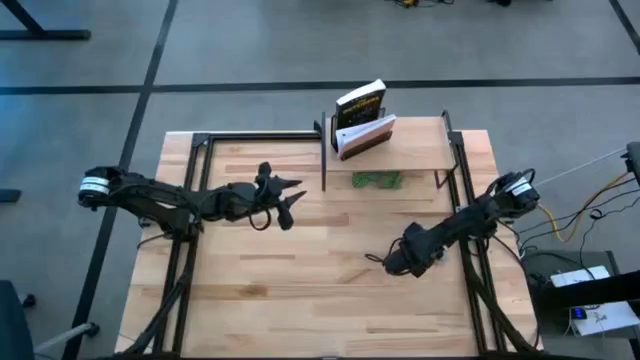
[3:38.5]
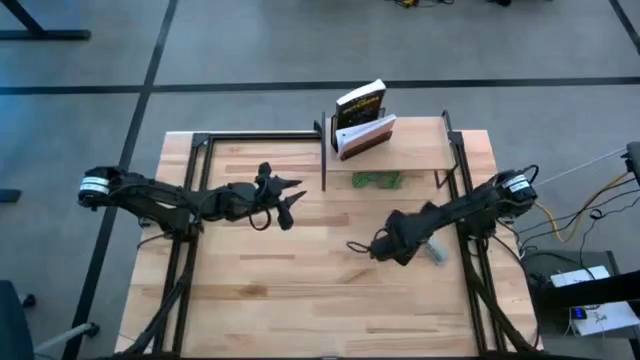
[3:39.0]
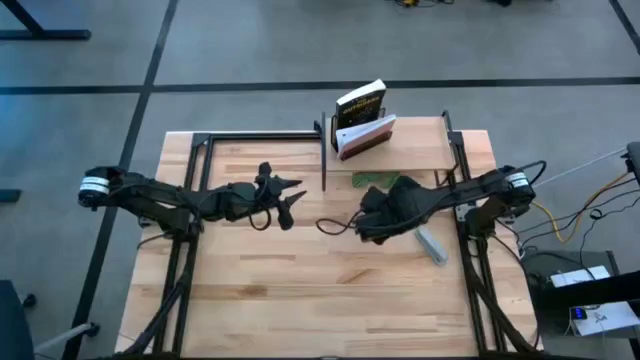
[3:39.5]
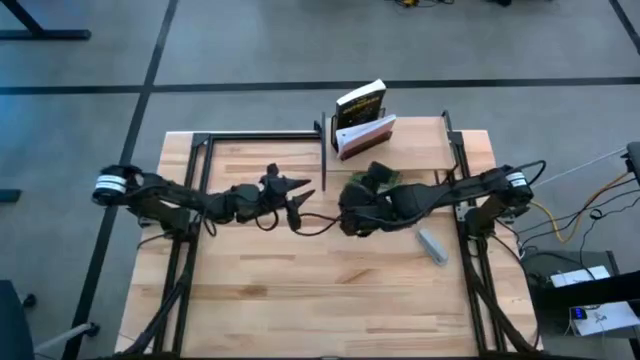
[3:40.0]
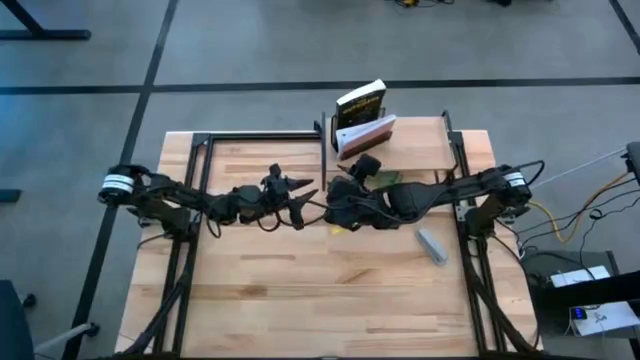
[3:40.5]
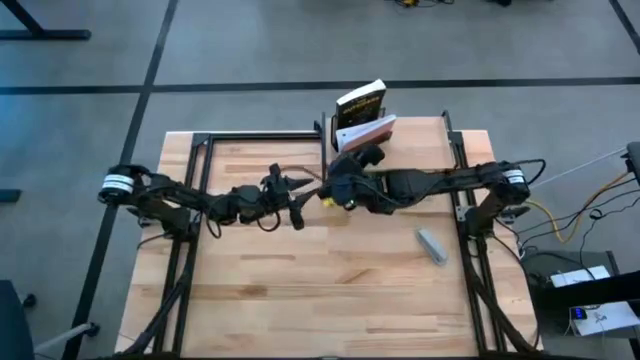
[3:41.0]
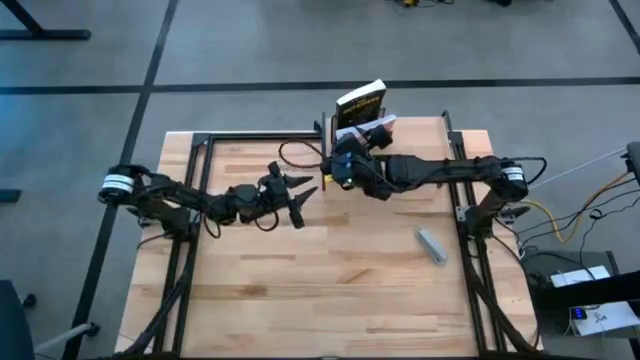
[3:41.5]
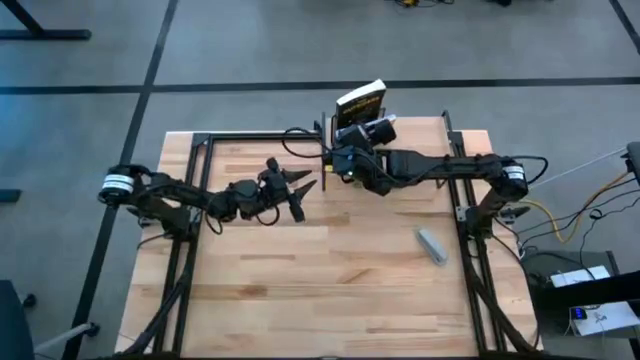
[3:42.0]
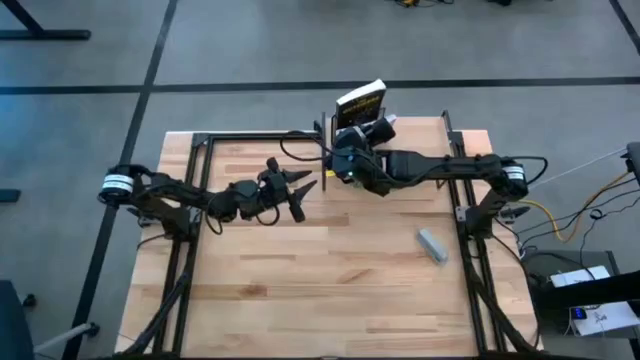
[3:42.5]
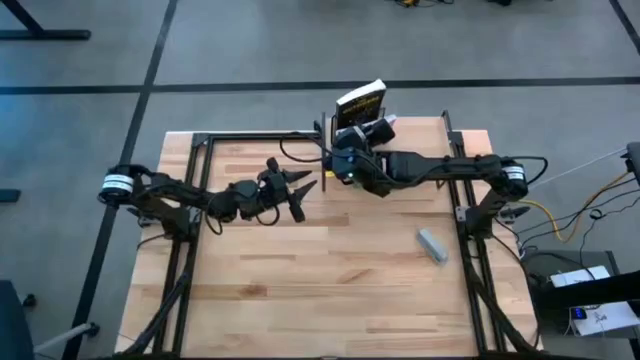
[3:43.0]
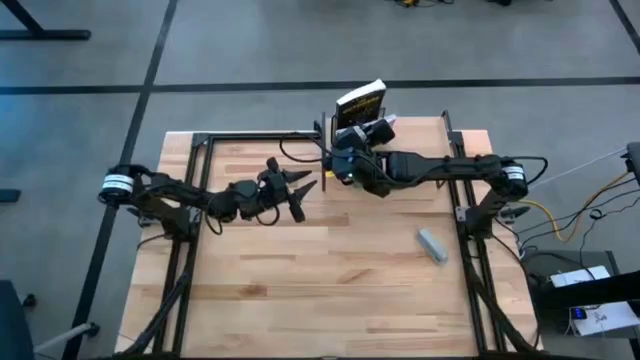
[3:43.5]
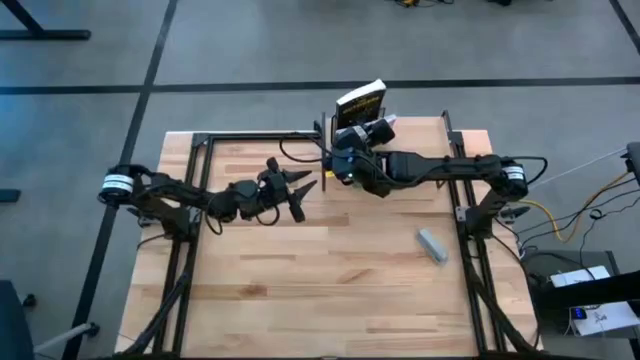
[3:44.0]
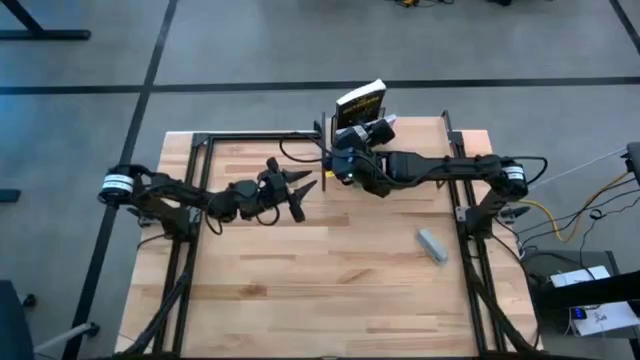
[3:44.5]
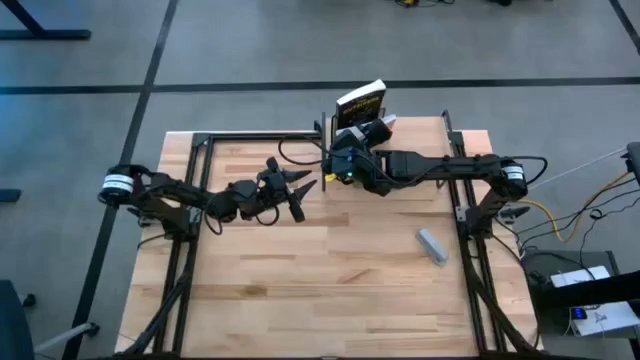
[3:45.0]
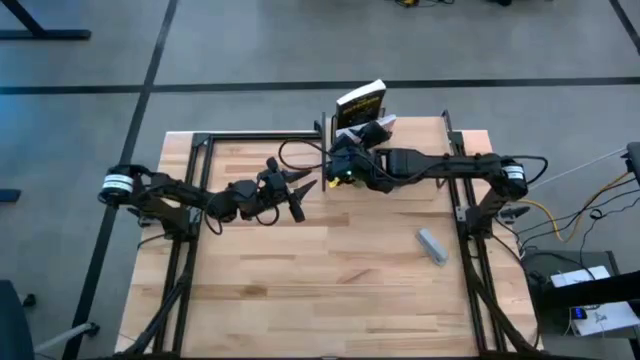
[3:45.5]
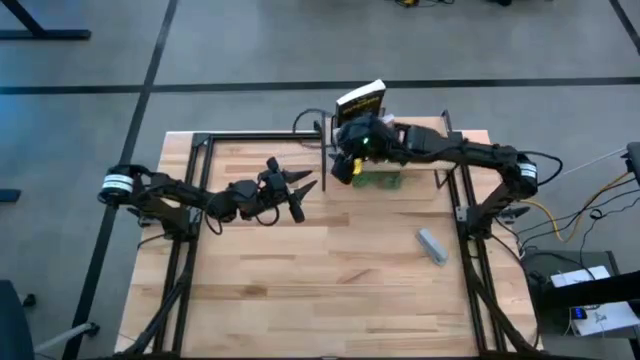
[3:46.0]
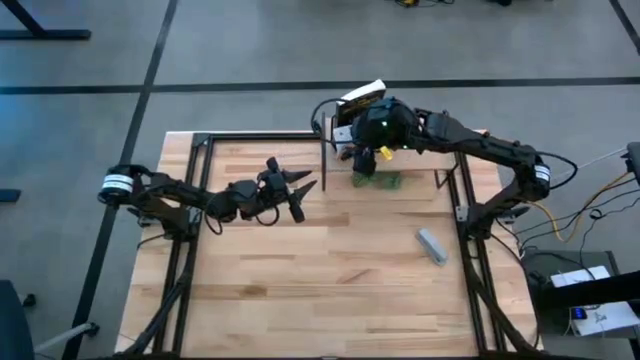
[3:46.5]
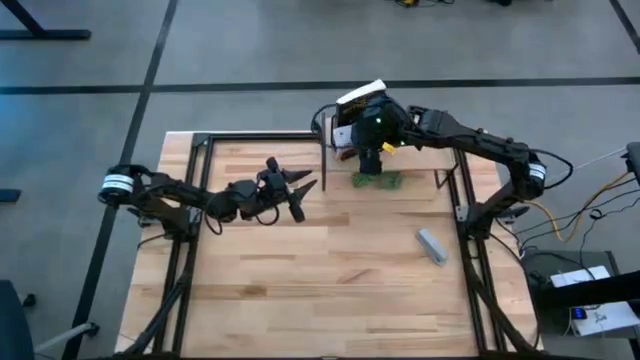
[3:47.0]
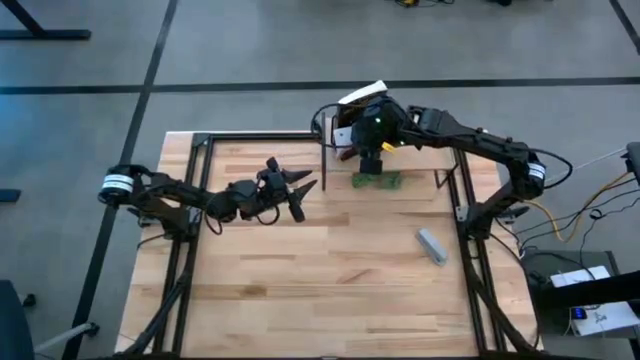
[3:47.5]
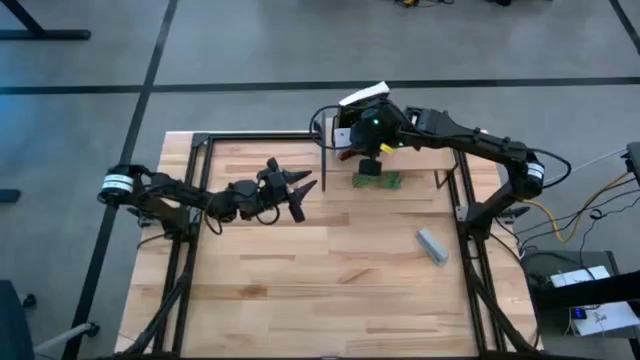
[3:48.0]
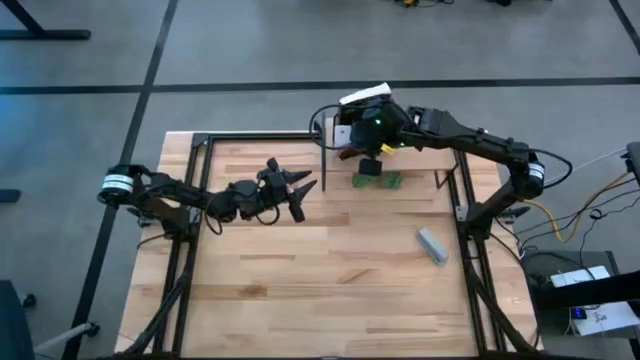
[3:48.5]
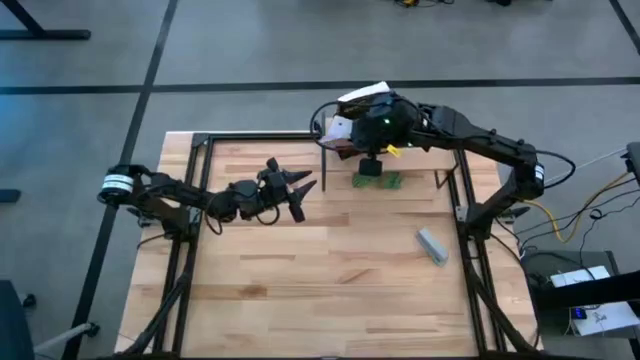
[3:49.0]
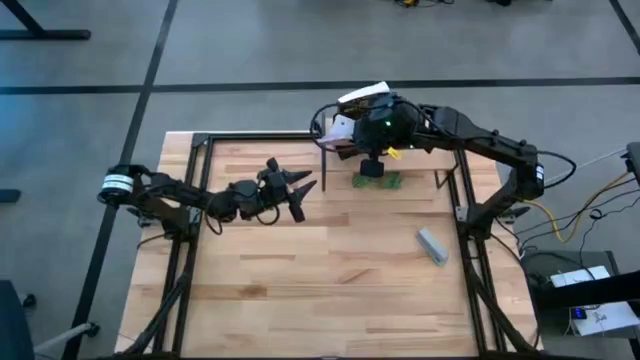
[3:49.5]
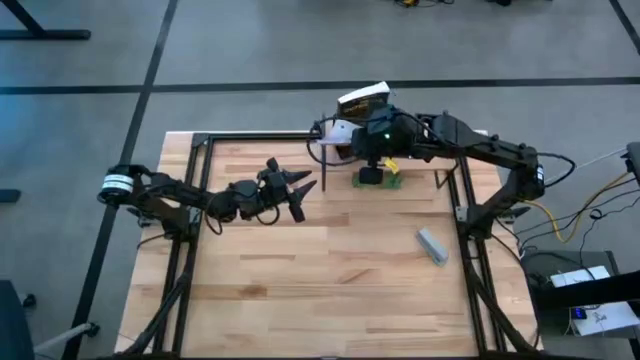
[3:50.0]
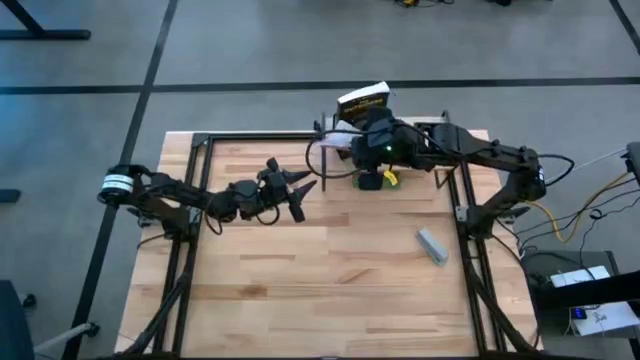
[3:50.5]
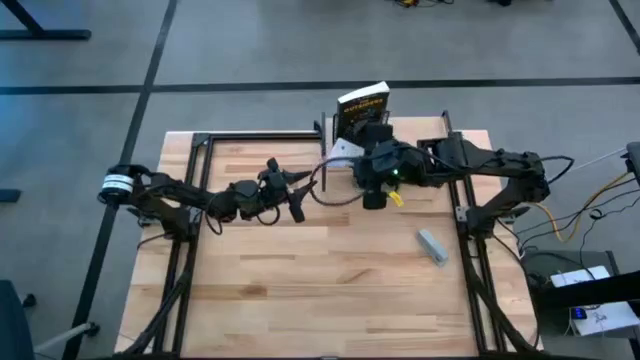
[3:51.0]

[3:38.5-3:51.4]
Task: Stock shelves
Remove the pink notebook from the black desk organizer on the shelf

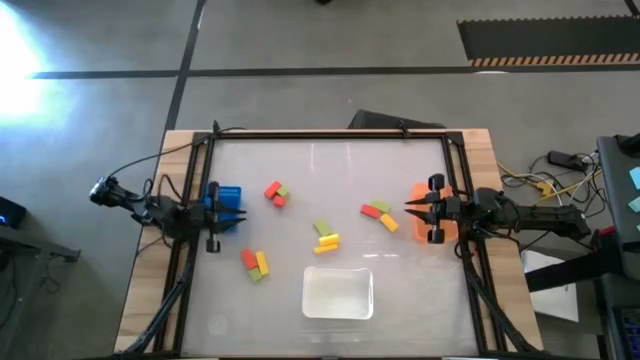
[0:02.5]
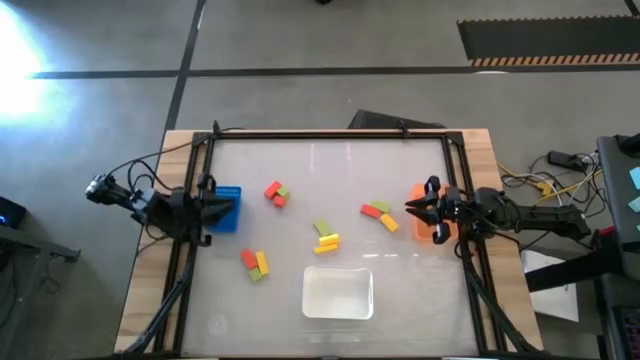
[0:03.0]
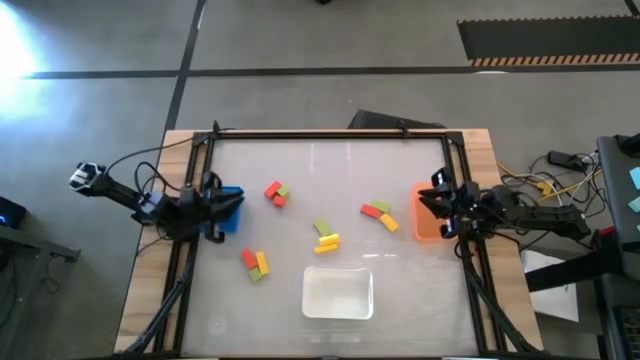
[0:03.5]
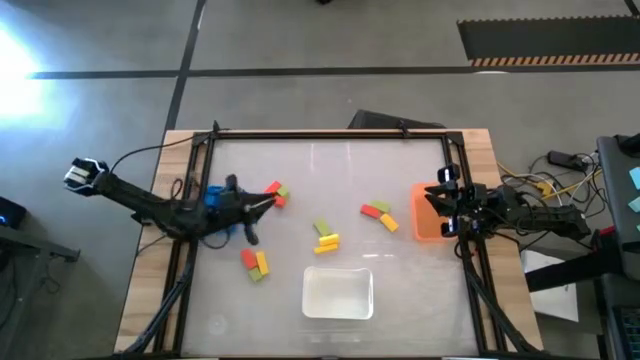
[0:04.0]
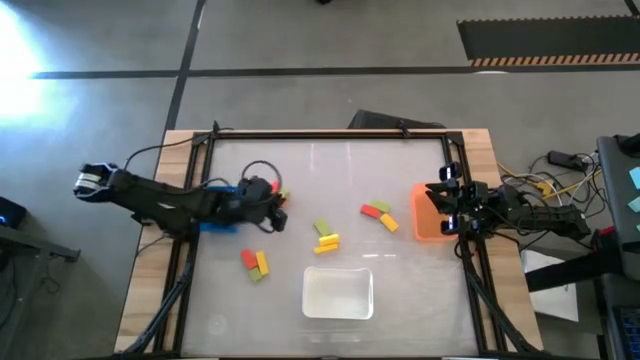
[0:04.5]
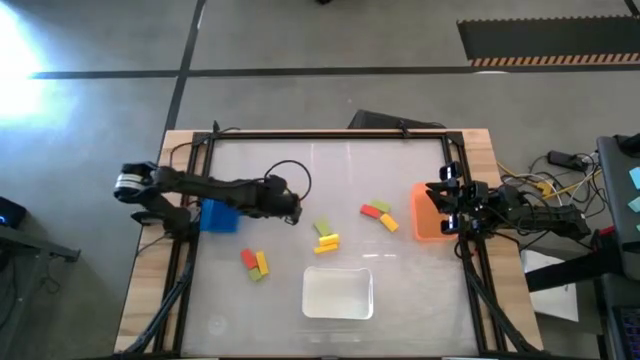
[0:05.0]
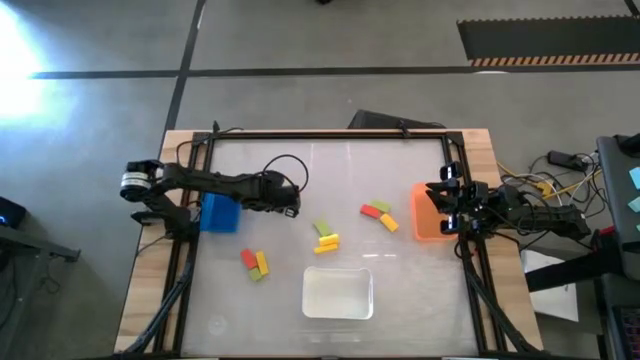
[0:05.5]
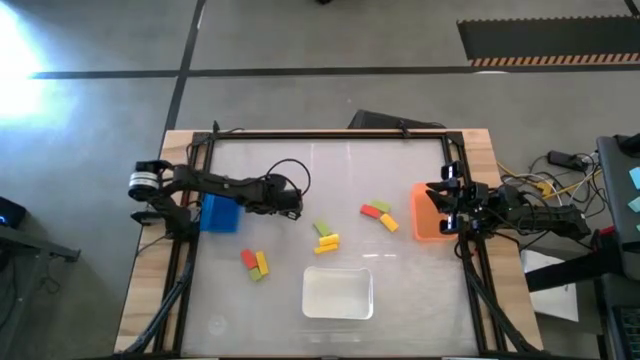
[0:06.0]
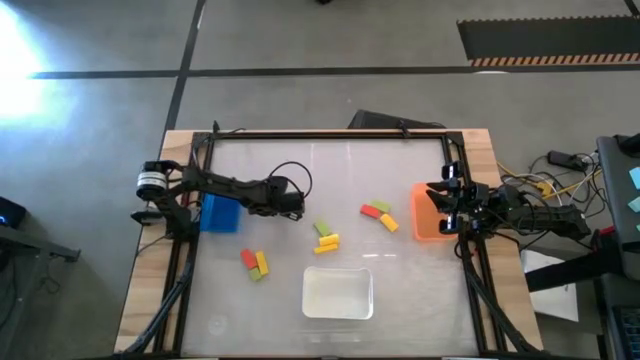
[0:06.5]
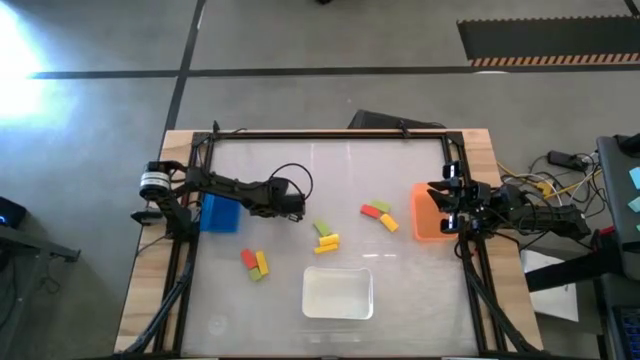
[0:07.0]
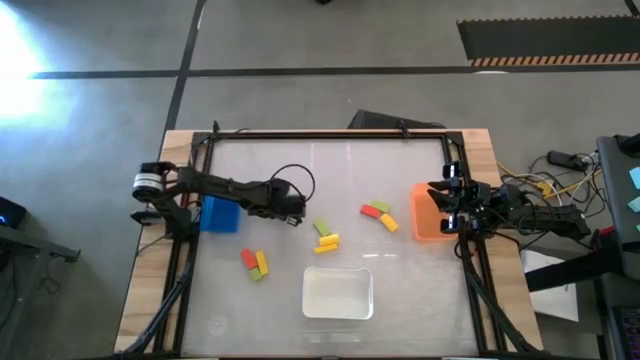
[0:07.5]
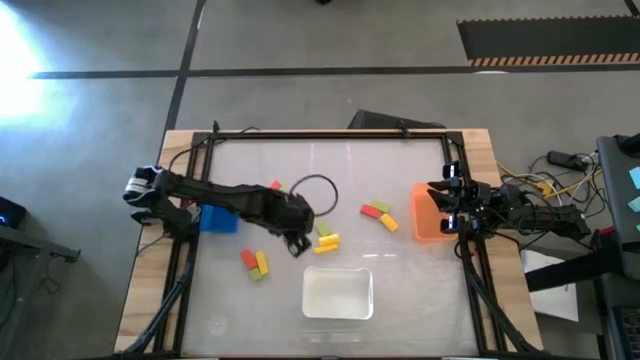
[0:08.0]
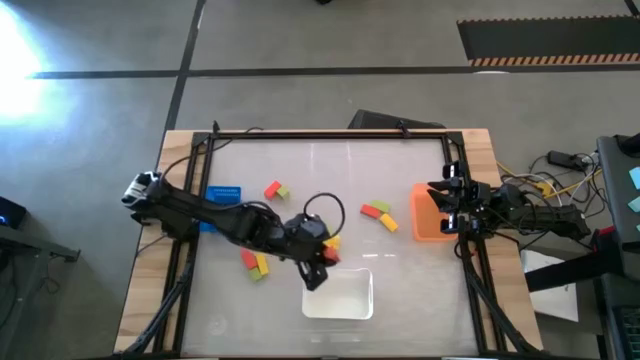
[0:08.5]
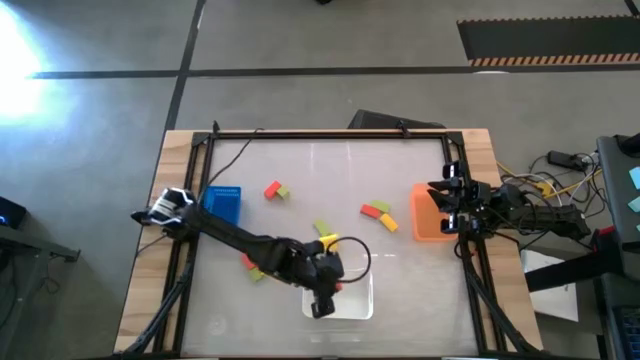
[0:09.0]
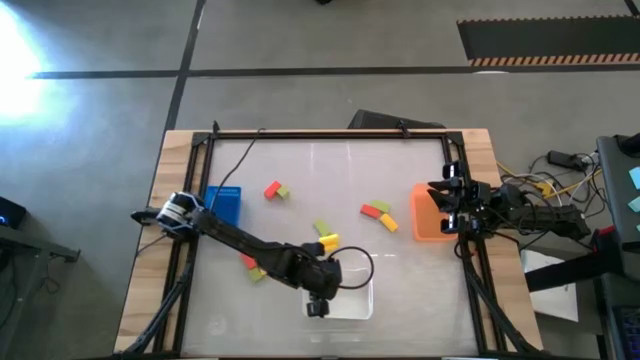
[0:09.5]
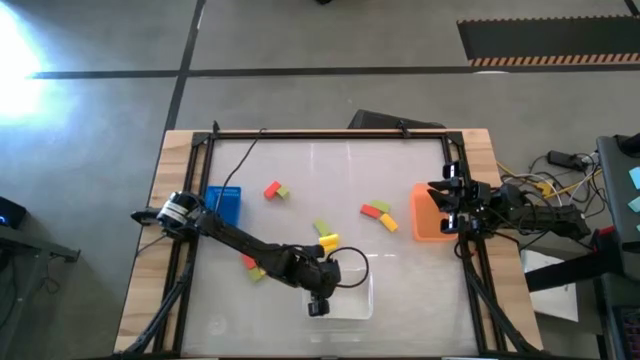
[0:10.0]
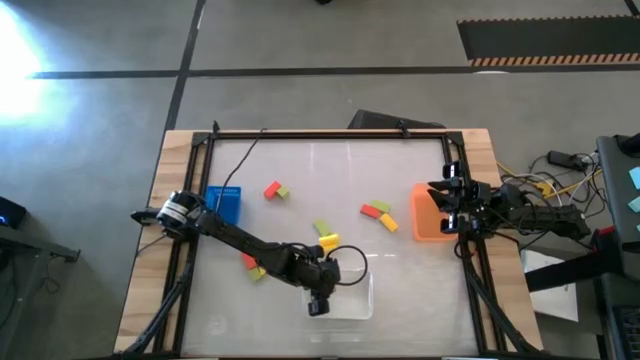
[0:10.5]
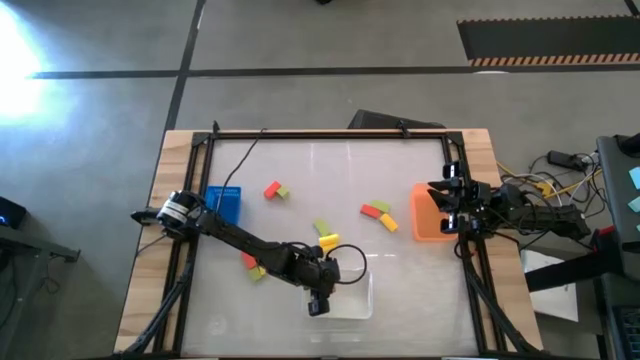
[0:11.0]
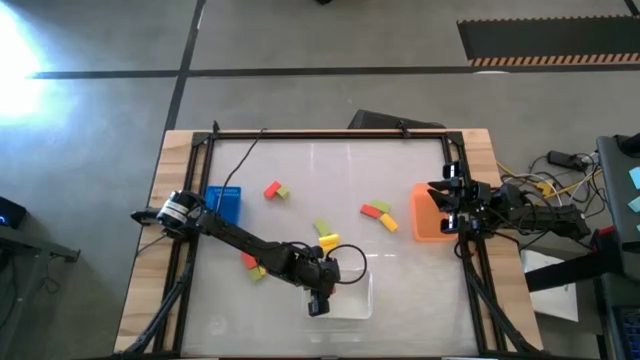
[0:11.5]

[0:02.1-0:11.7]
Task: Sort & place blocks by color
Put the orange block into the white bin
